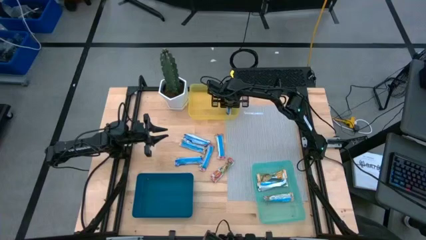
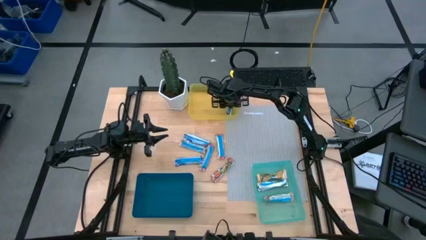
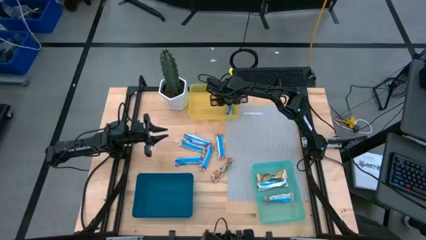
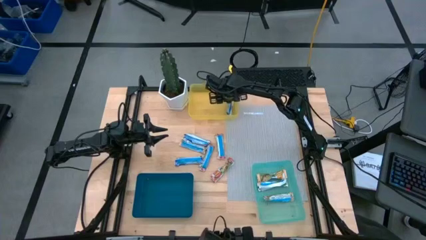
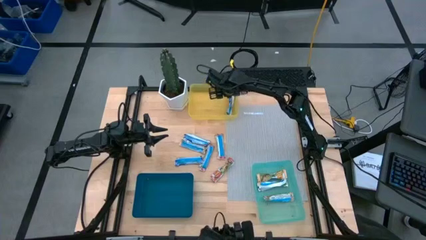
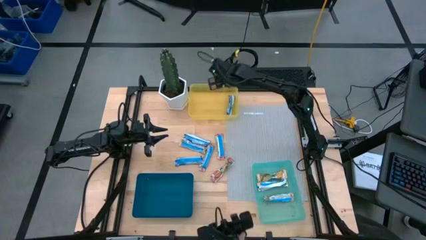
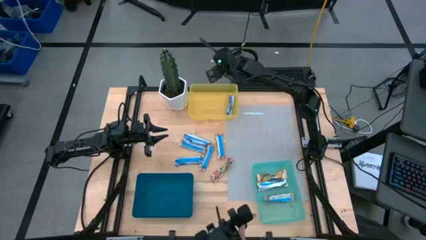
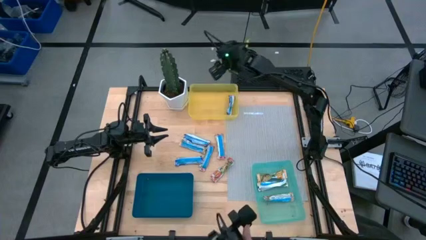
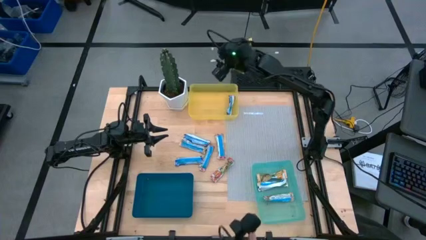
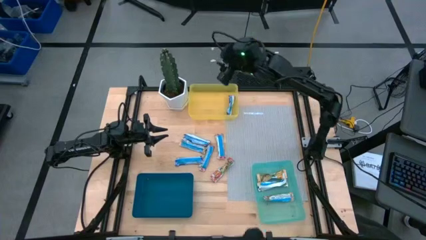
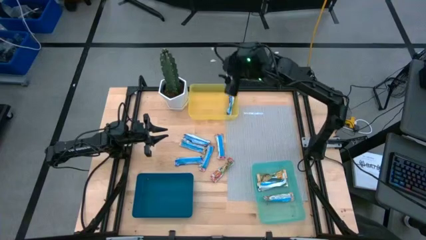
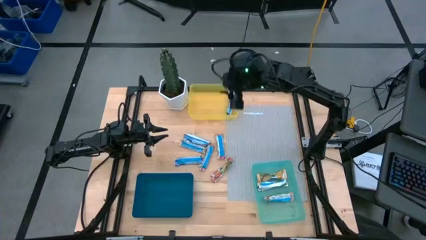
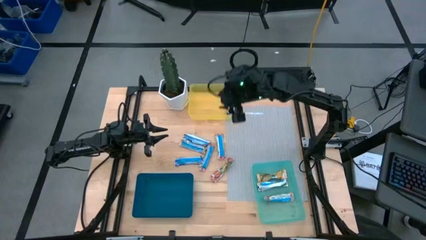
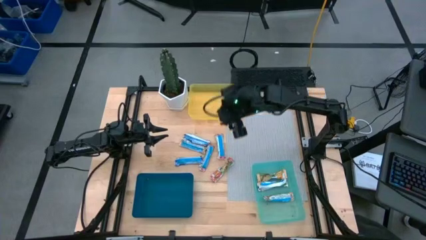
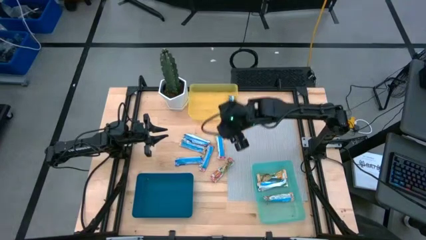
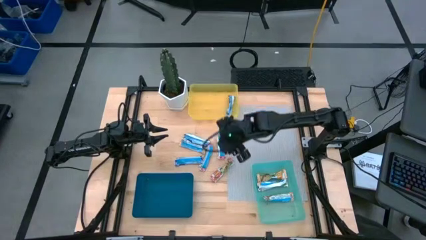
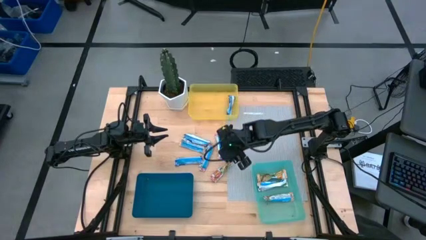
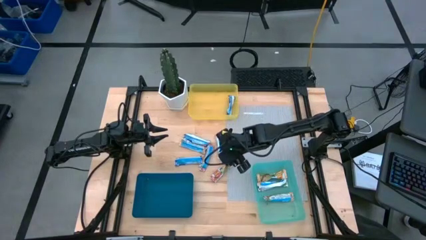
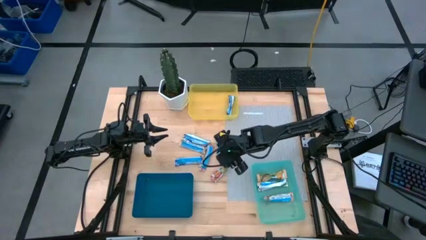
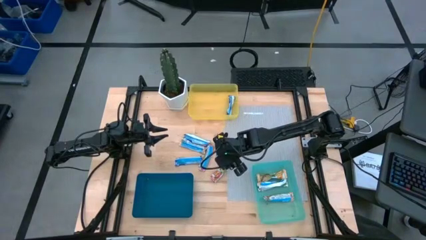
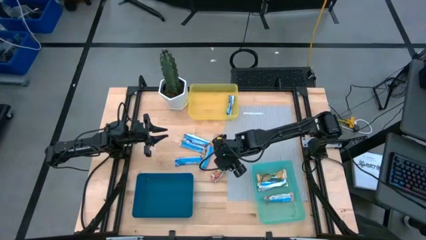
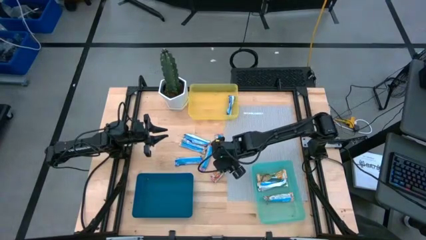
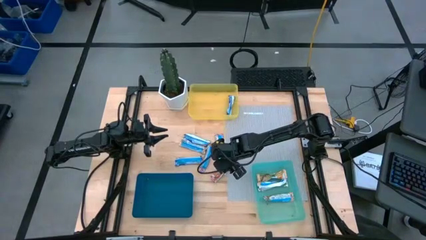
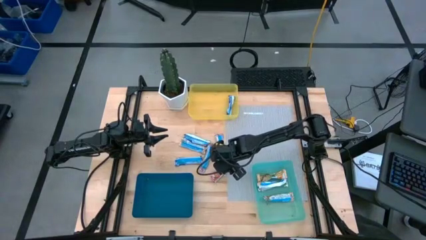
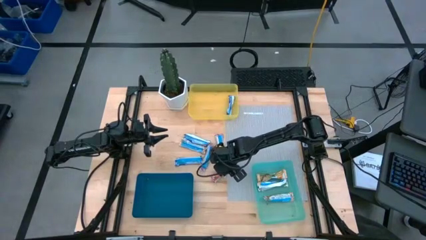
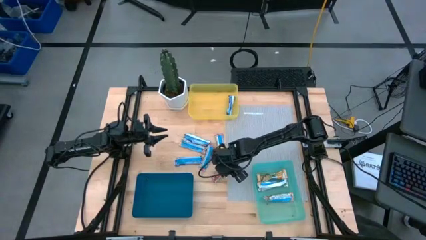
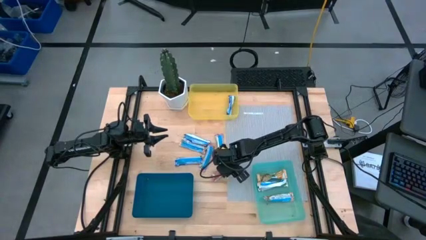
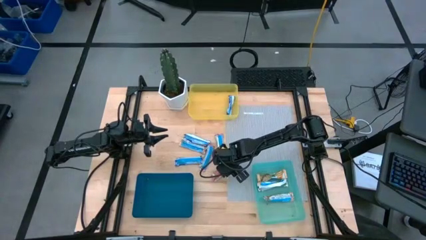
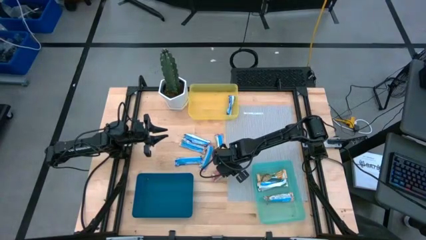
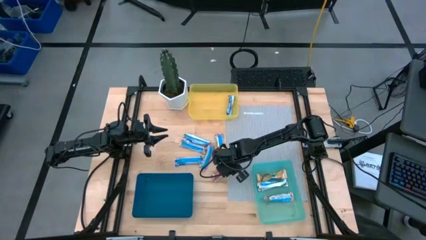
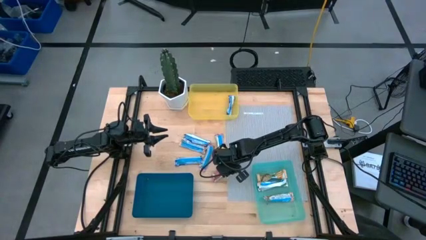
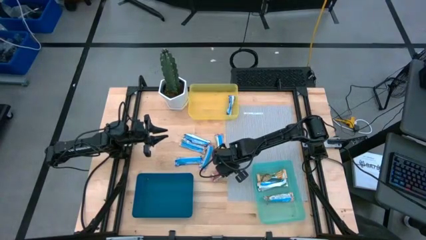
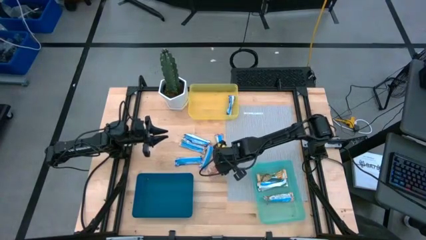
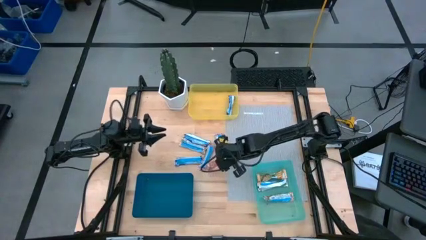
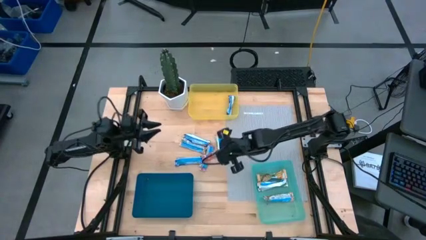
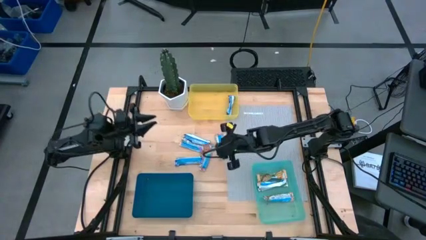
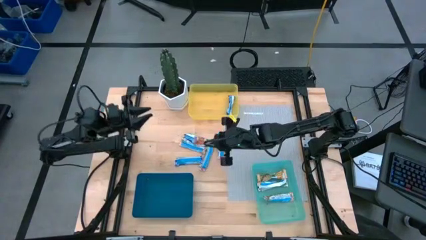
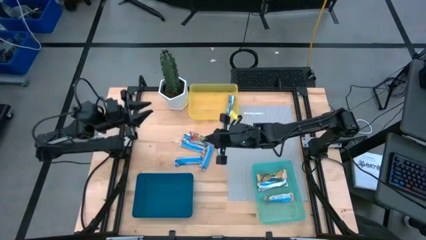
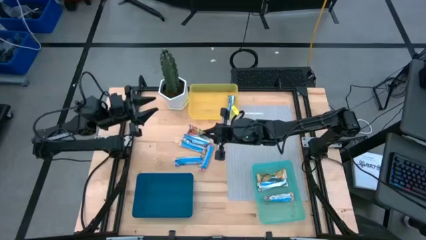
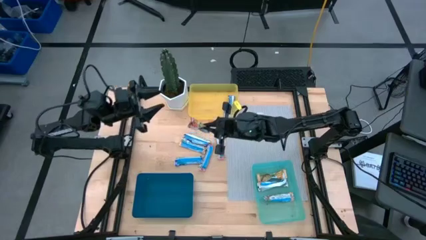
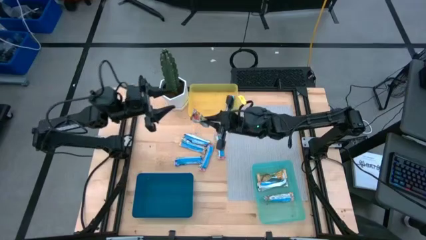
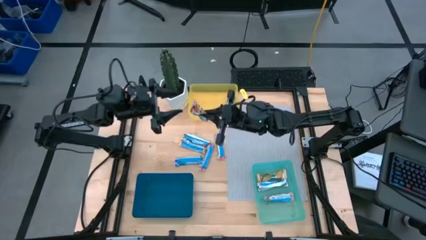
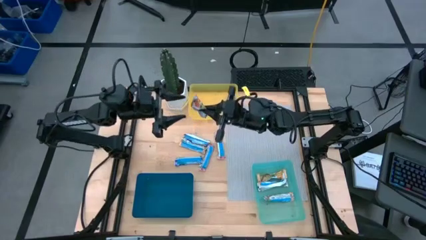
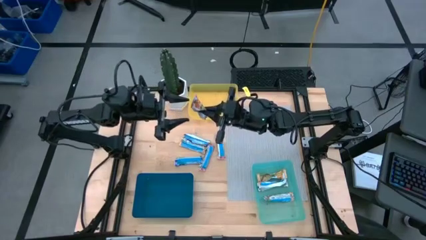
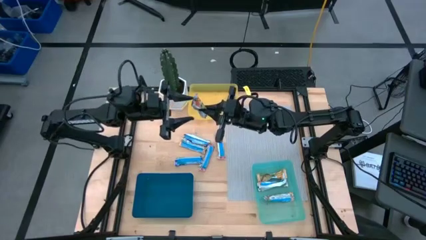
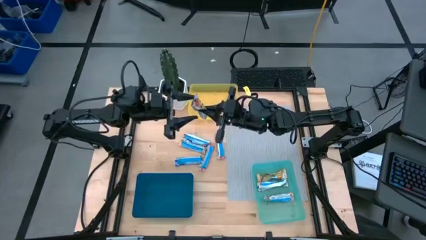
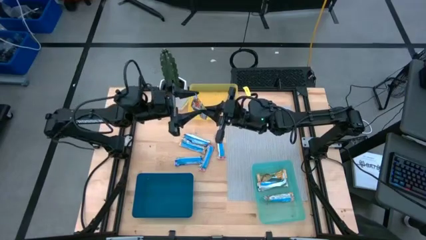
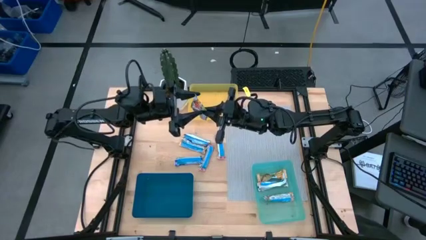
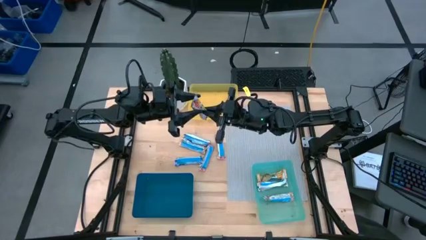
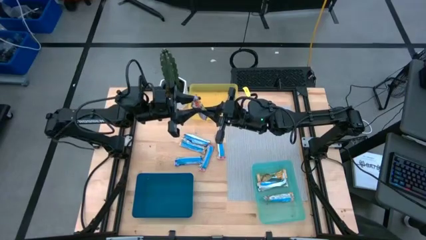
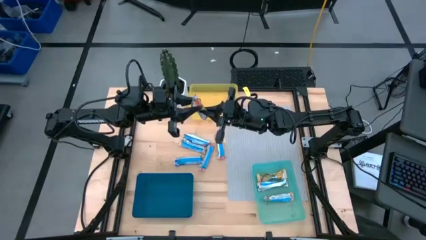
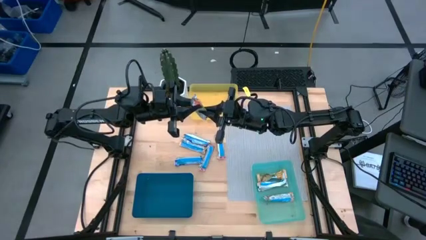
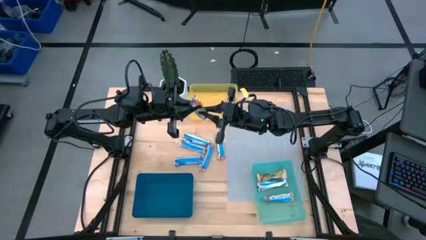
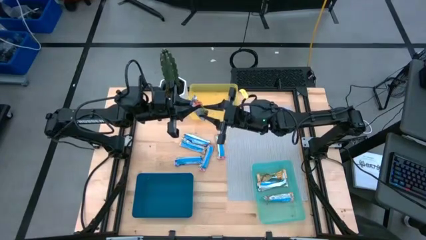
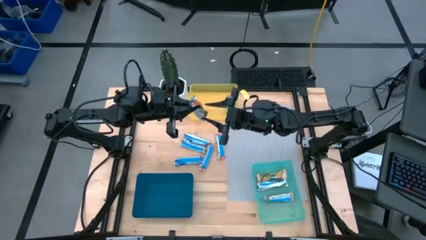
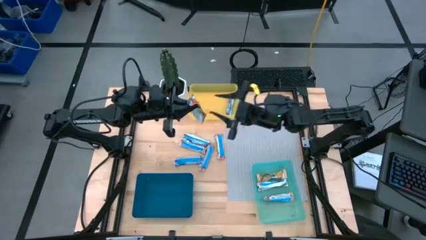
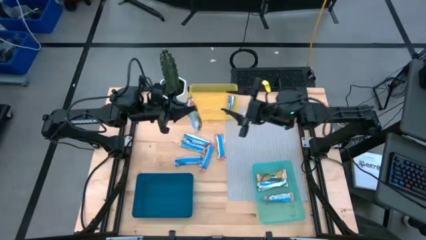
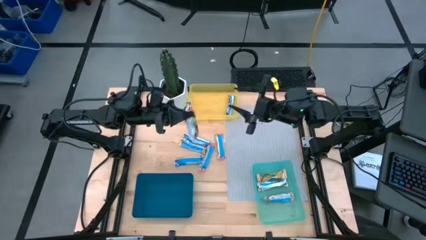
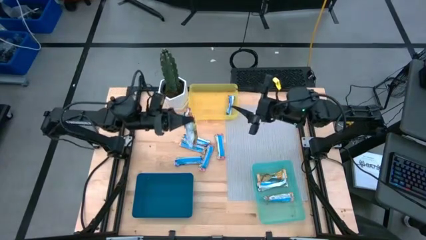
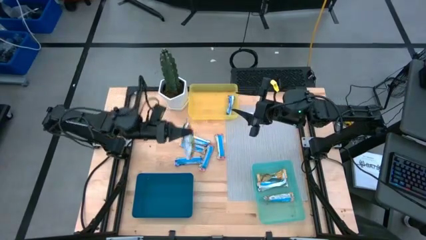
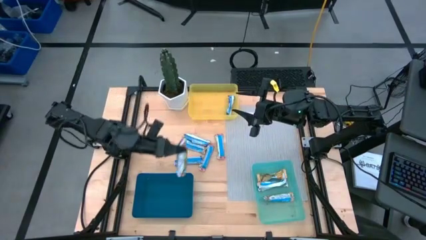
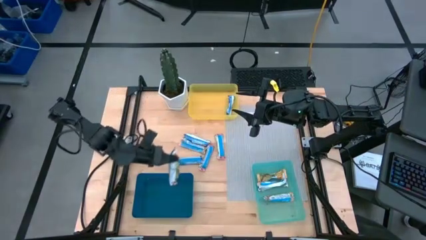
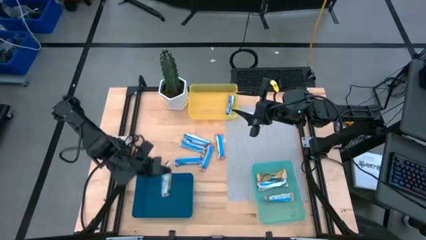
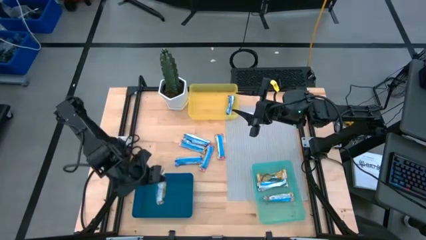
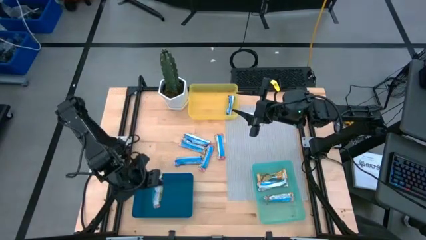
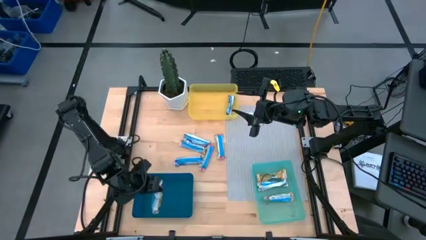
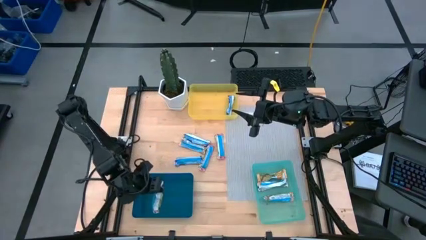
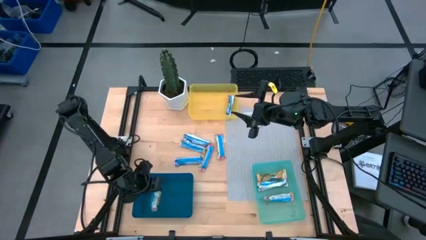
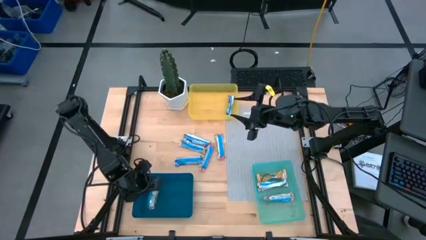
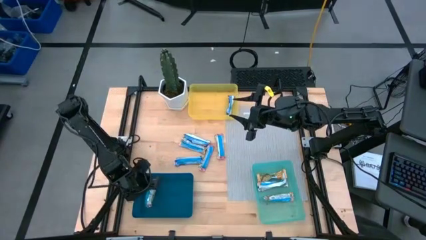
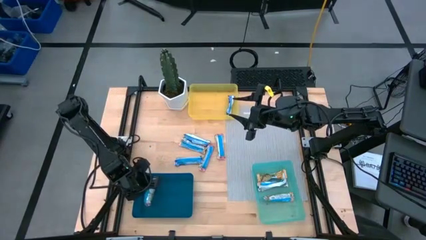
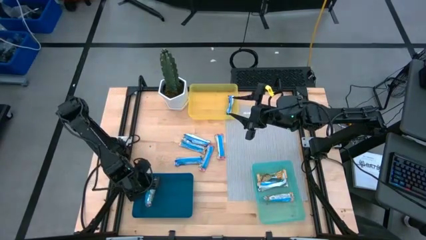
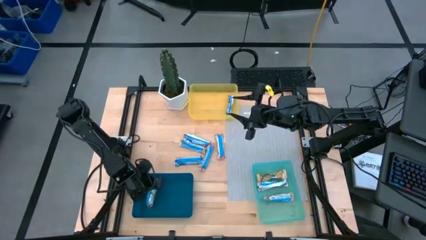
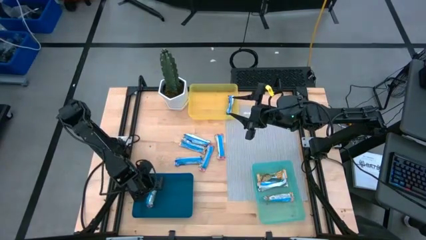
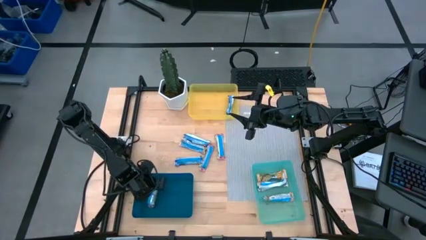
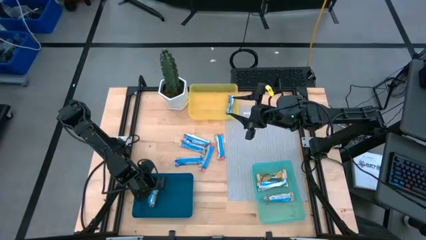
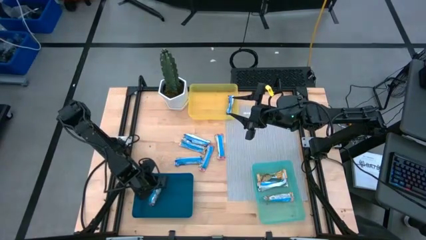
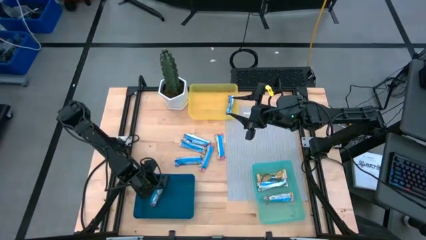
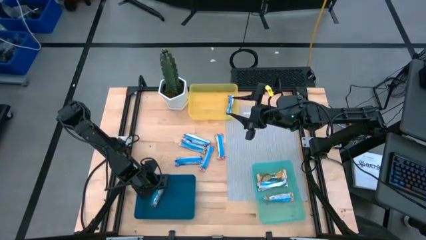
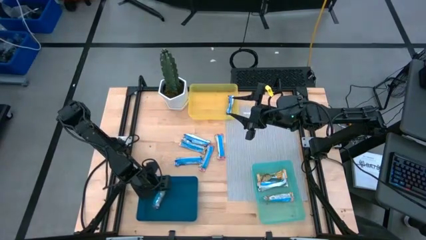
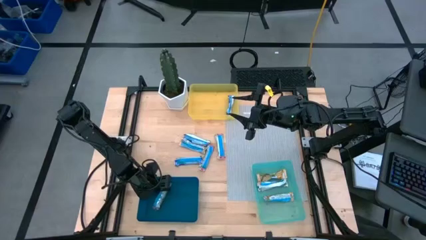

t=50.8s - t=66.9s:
Task: Pick and place Granola Bars by type
Put the red granola bar into the blue bin
